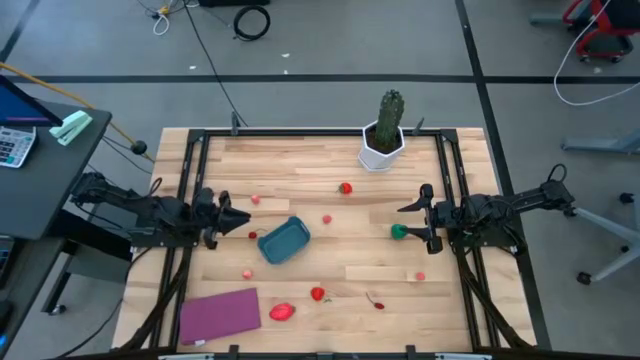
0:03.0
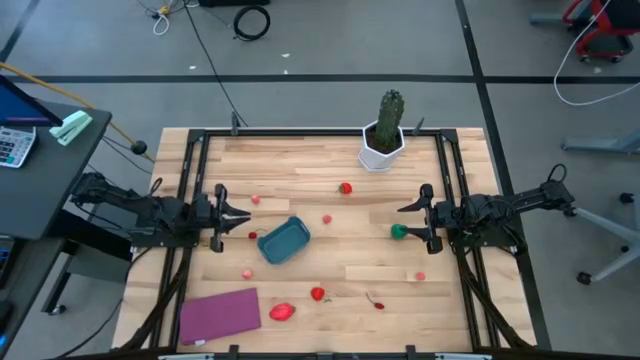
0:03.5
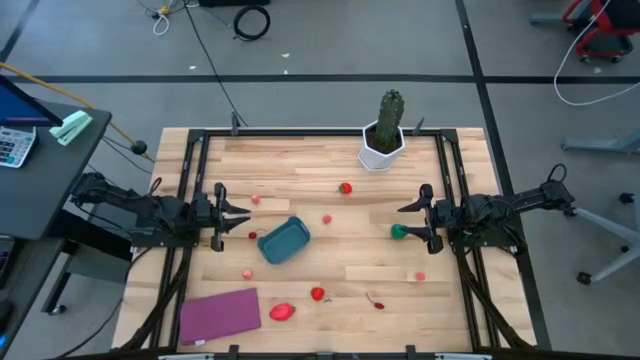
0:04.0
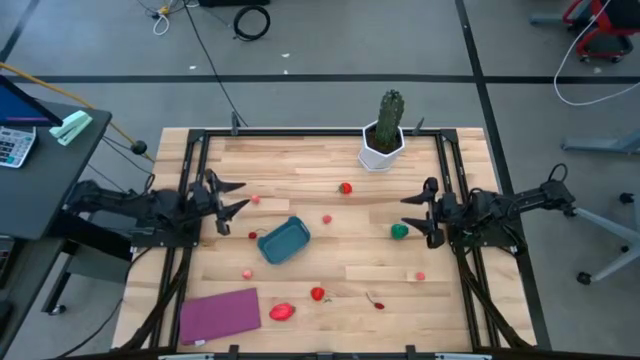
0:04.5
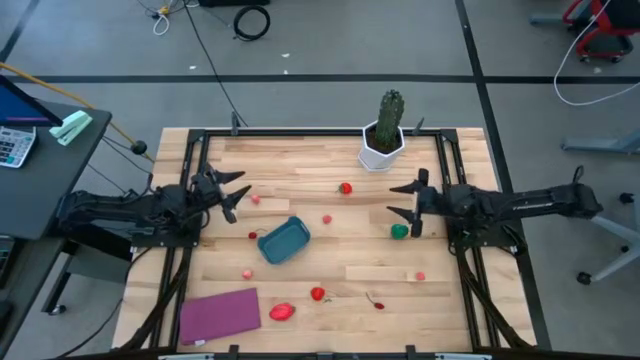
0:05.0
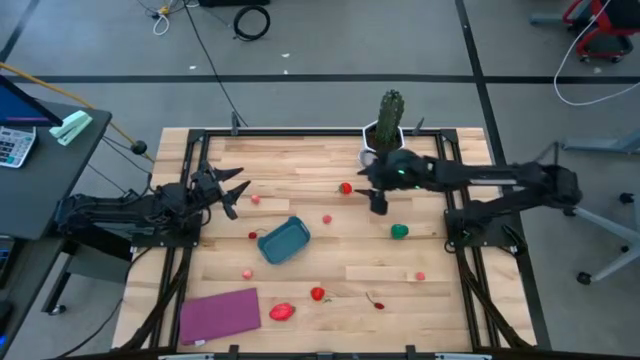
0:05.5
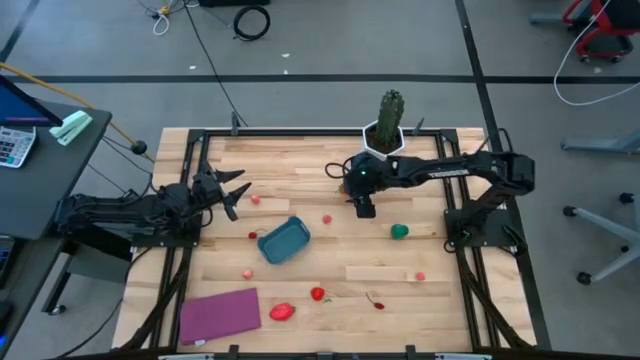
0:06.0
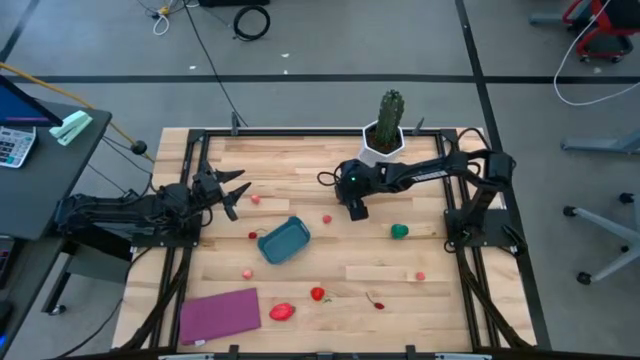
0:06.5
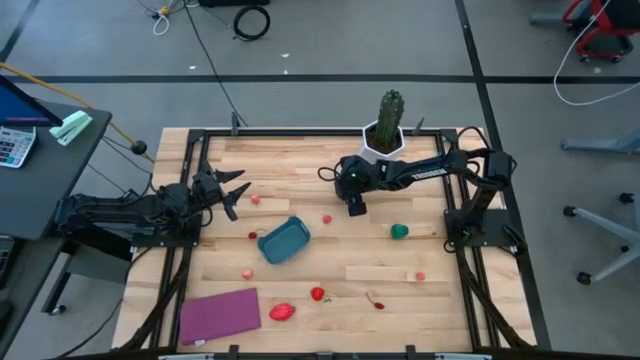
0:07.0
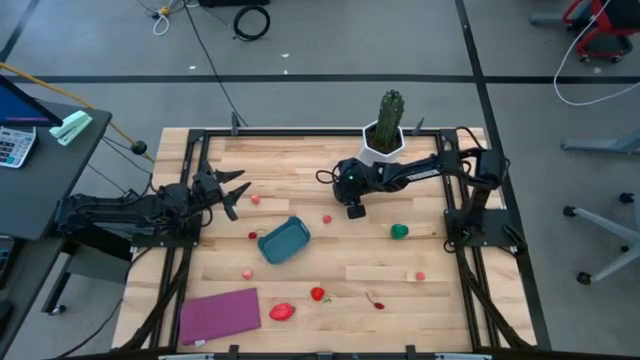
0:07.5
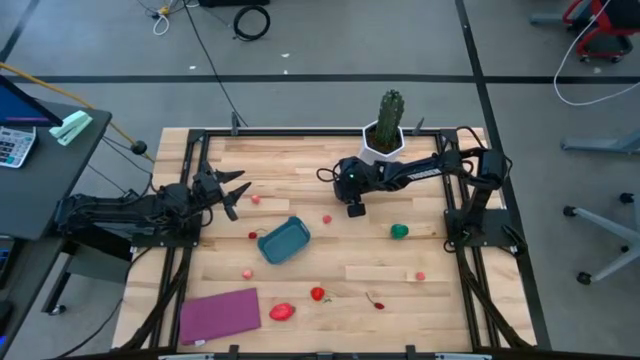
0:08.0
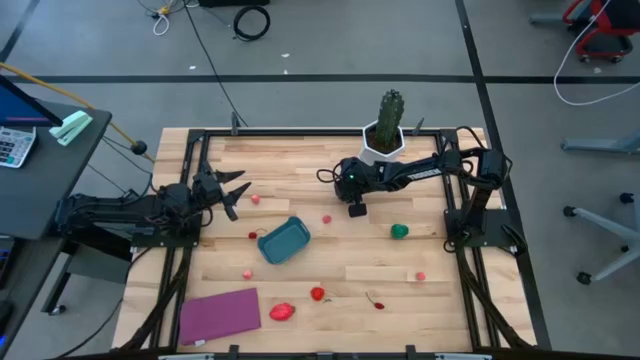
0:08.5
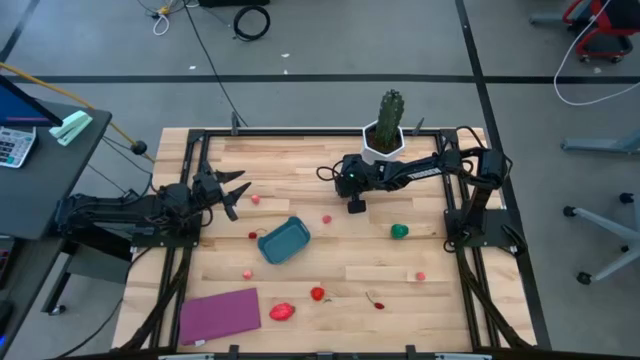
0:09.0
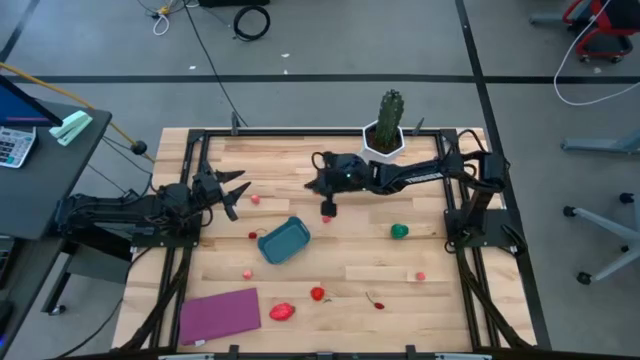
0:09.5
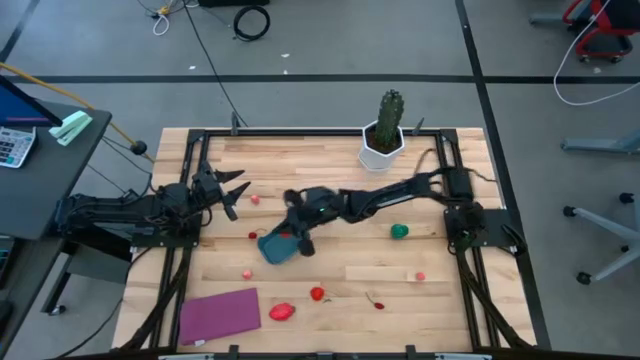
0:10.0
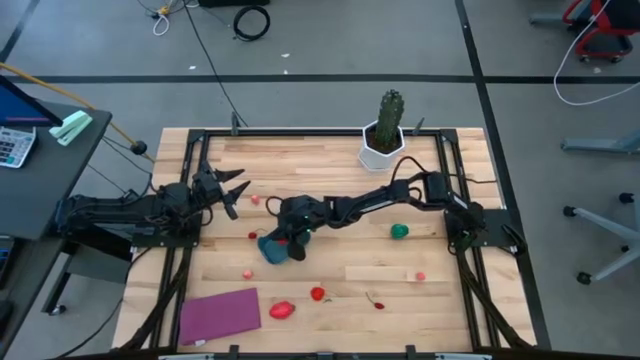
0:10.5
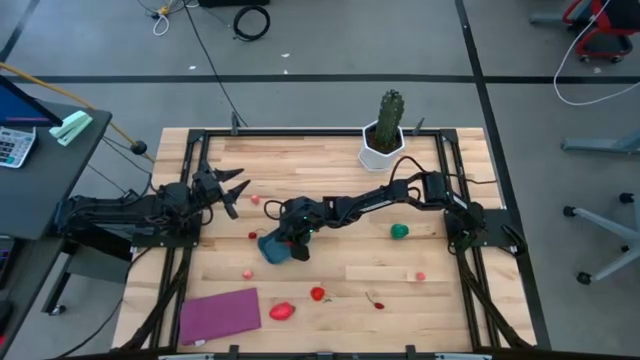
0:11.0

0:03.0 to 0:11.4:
Task: Pick and placing Produce into tupperware
Put the top strawberry into the blue bin

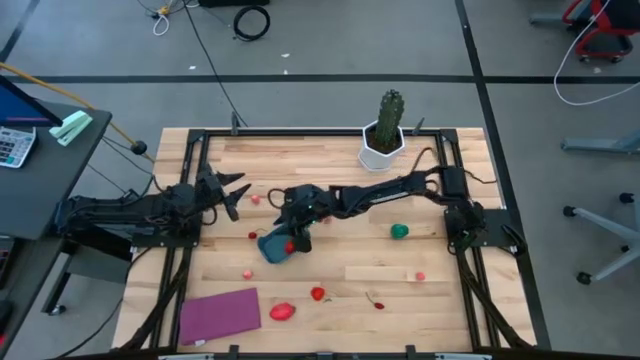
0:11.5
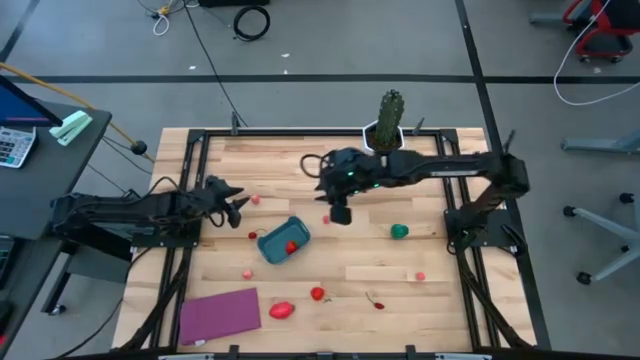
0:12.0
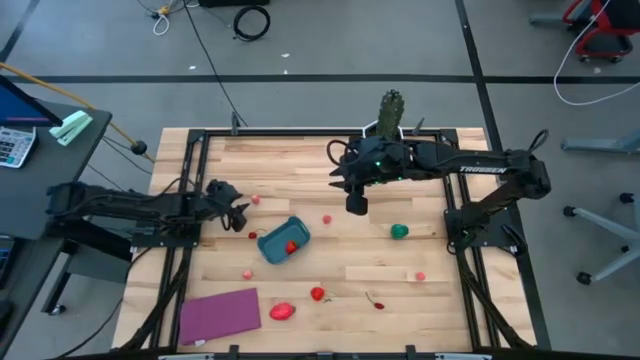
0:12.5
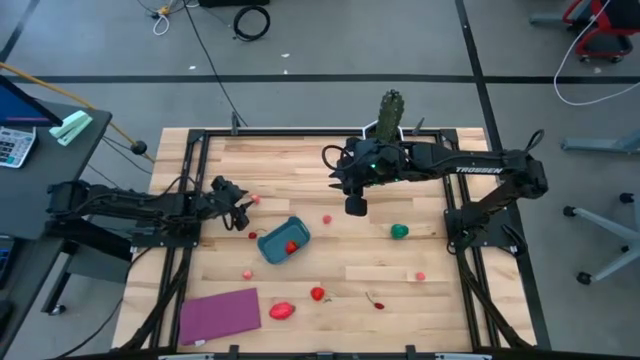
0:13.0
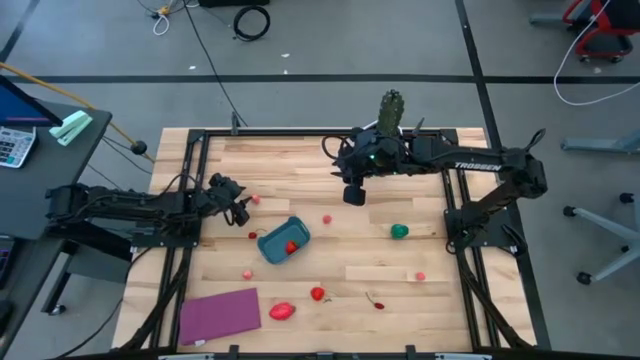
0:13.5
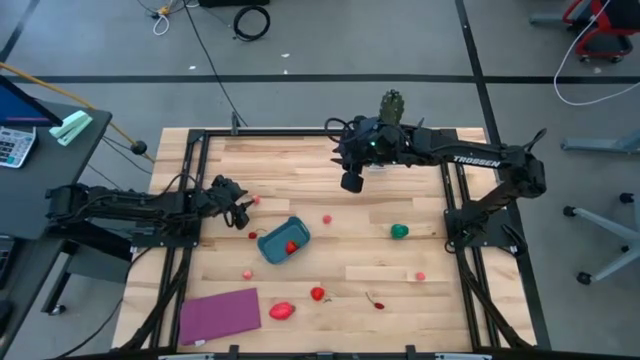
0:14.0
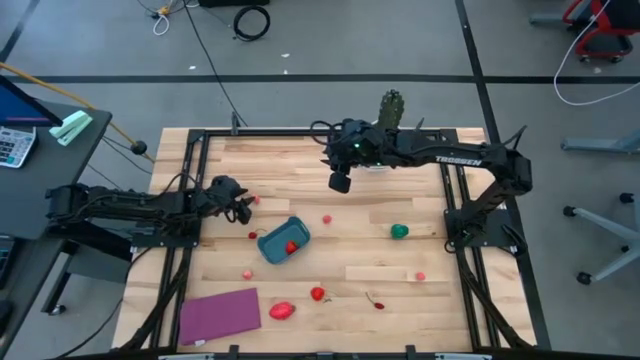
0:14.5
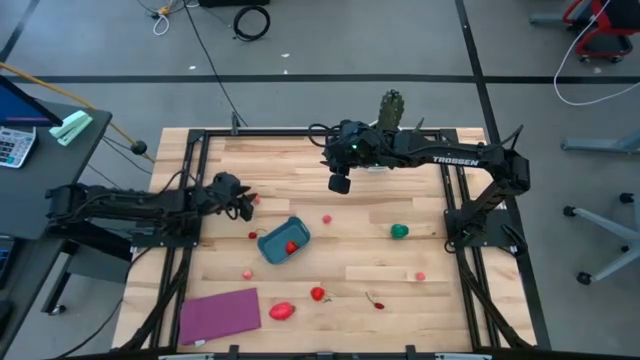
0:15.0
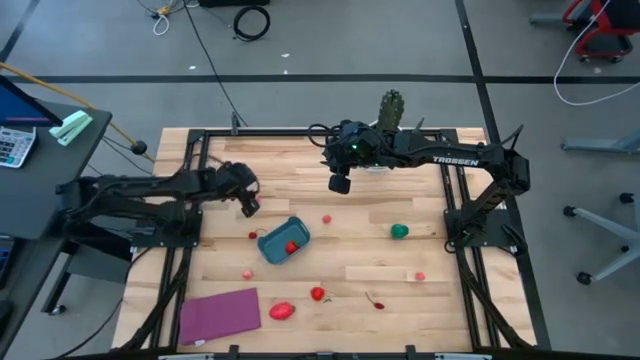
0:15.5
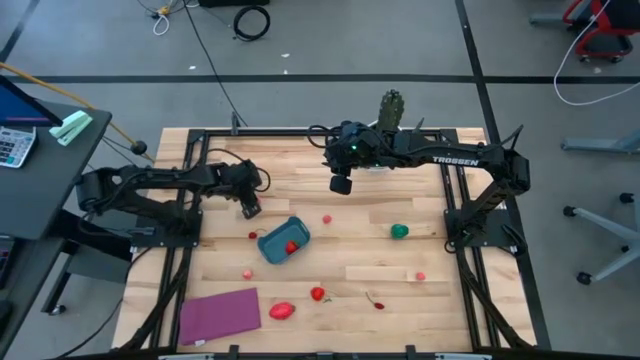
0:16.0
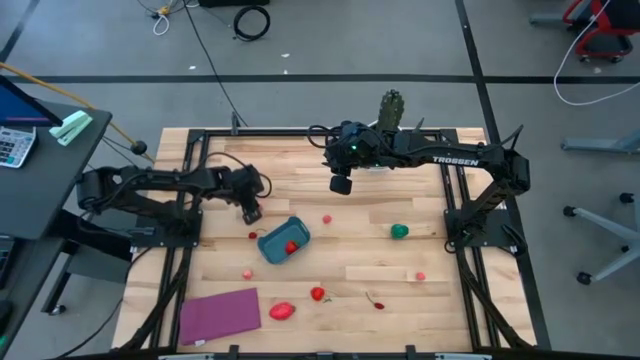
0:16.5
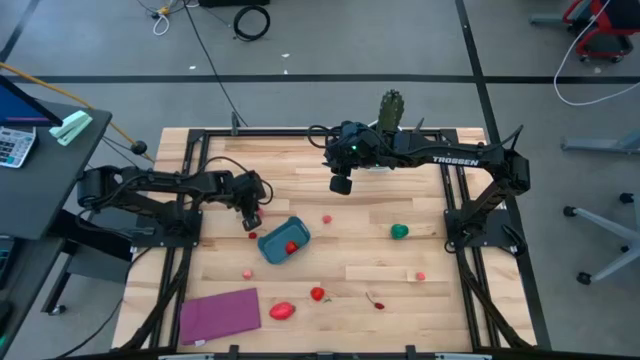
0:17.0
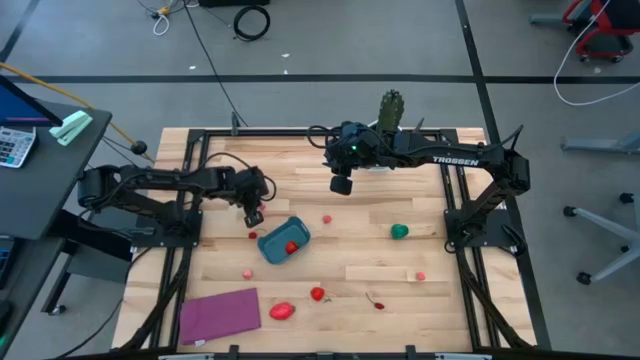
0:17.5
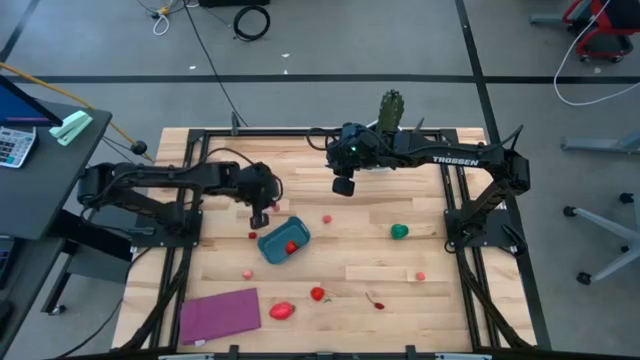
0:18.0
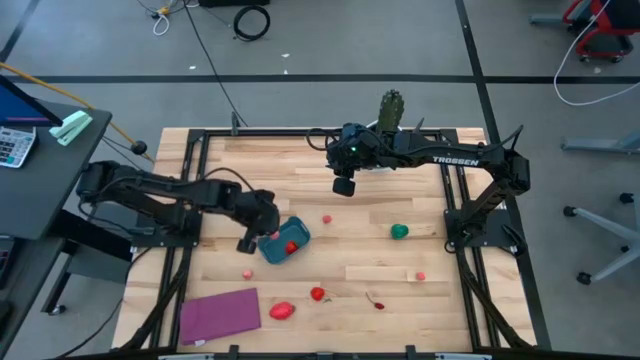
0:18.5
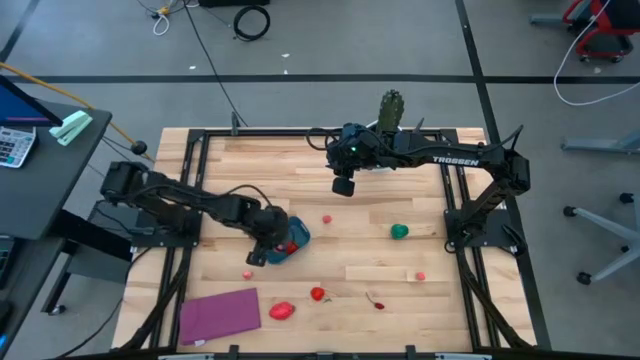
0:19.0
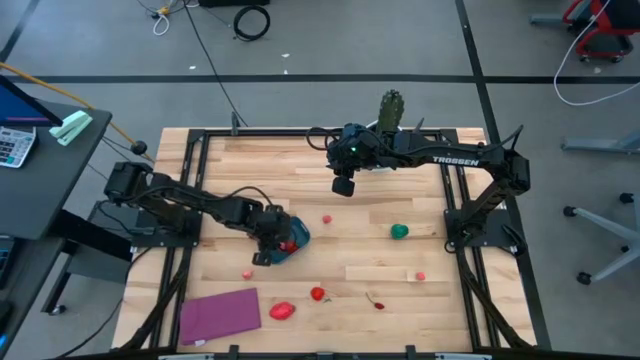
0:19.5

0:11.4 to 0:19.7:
Put the pink peach into the blue bin

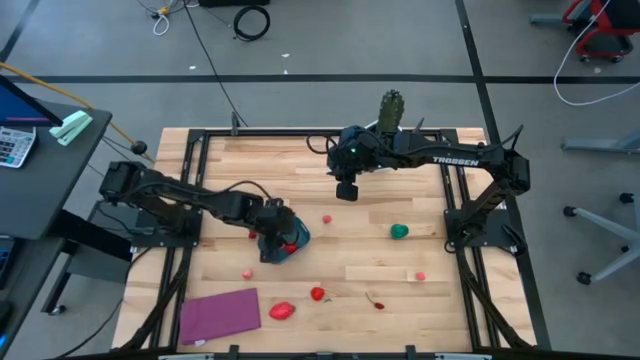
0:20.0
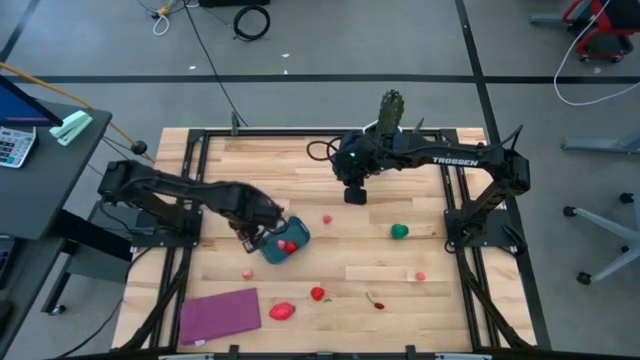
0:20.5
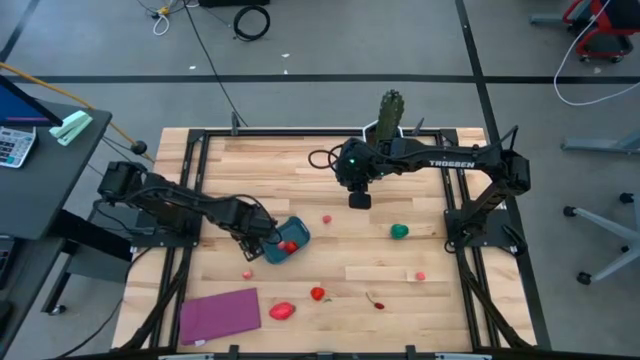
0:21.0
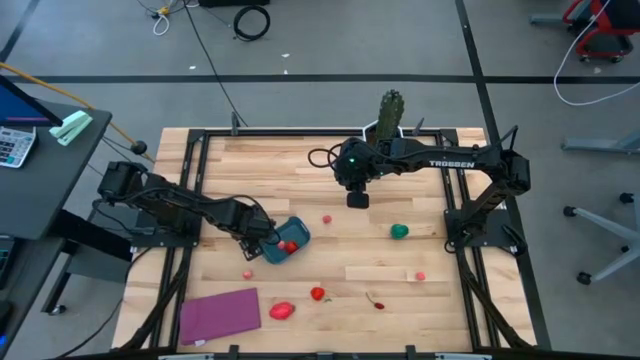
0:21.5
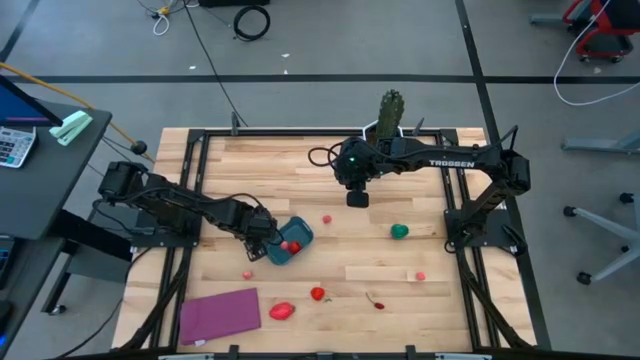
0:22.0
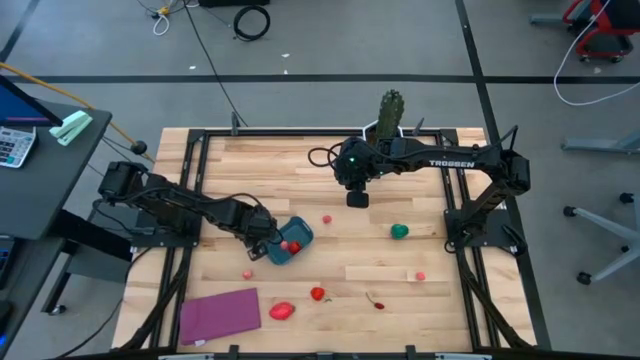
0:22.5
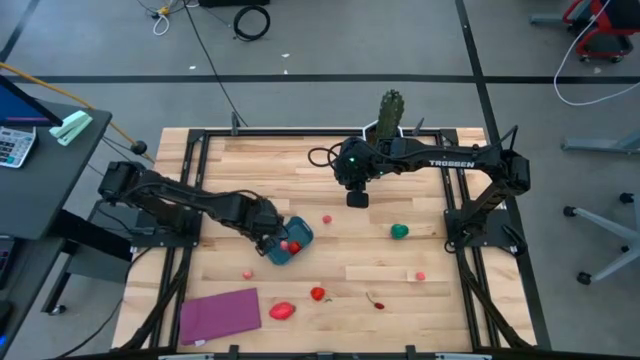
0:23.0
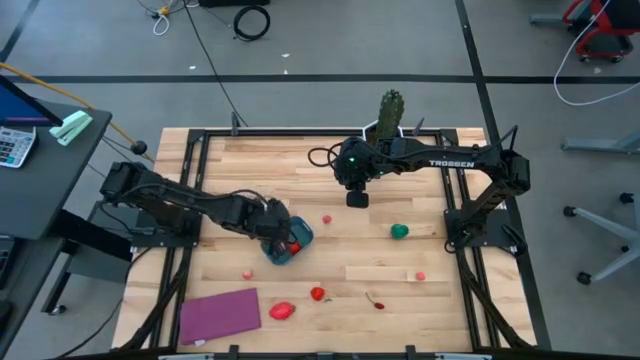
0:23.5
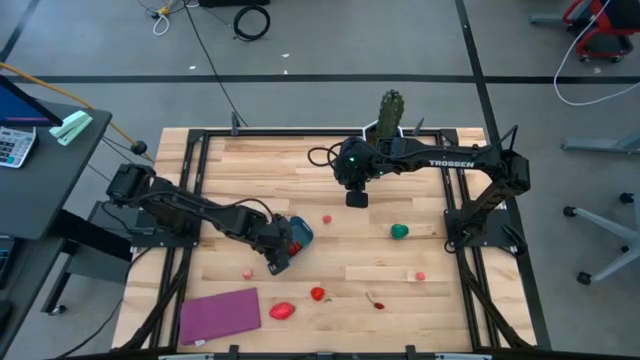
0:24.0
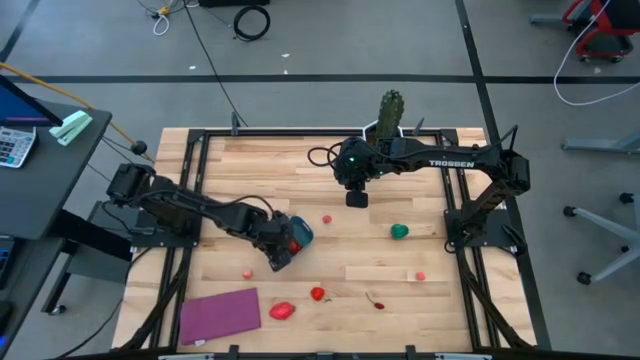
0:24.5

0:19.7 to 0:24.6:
Put the top red cherry into the blue bin
